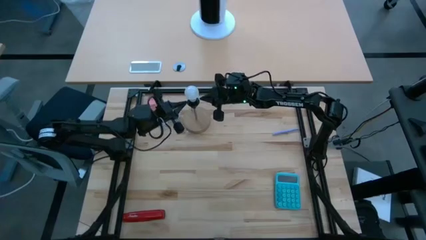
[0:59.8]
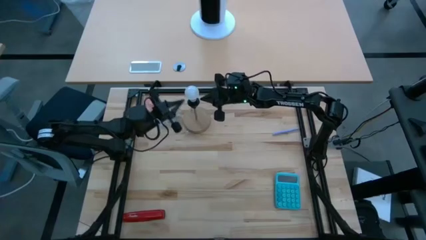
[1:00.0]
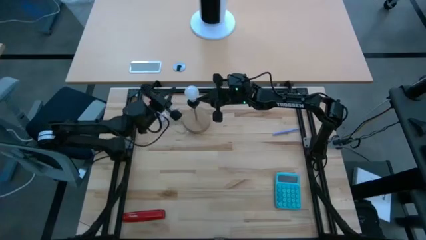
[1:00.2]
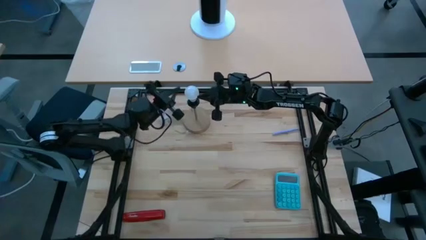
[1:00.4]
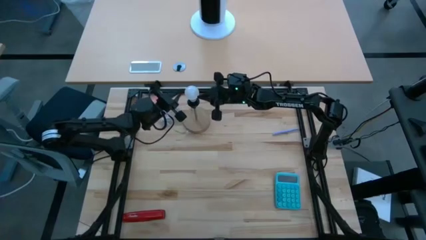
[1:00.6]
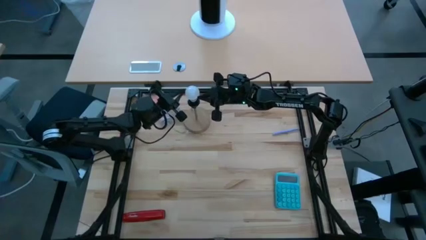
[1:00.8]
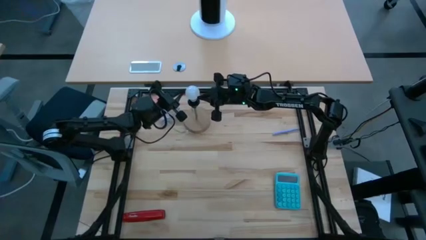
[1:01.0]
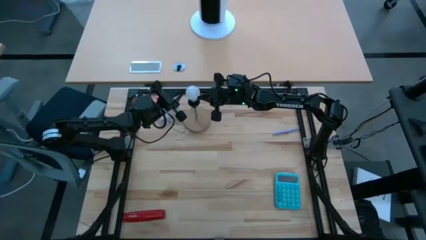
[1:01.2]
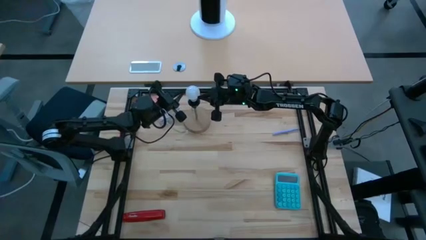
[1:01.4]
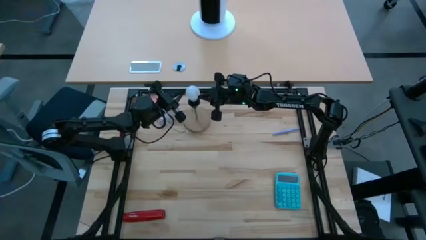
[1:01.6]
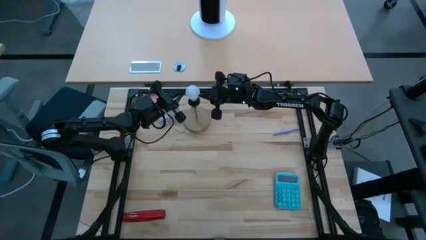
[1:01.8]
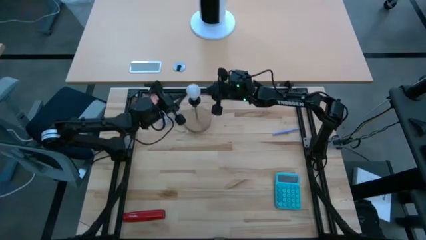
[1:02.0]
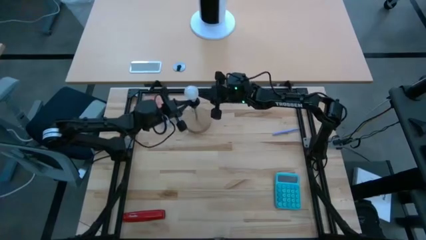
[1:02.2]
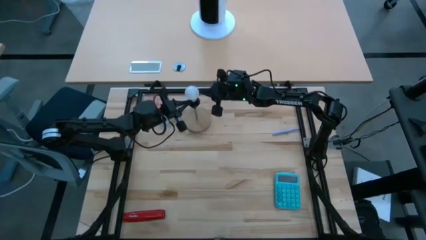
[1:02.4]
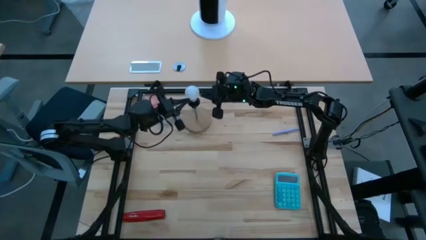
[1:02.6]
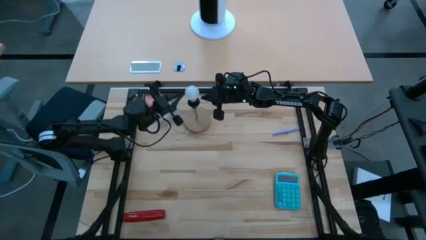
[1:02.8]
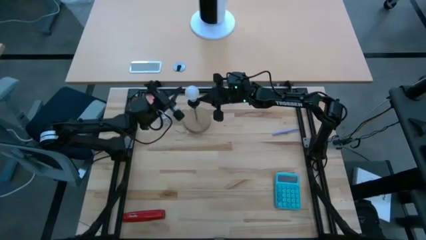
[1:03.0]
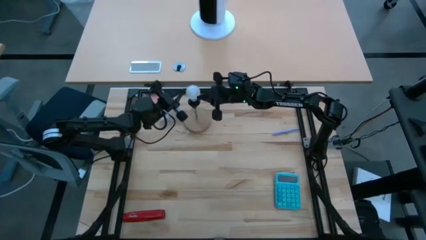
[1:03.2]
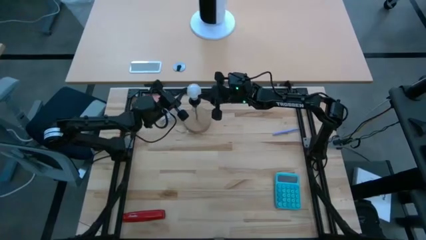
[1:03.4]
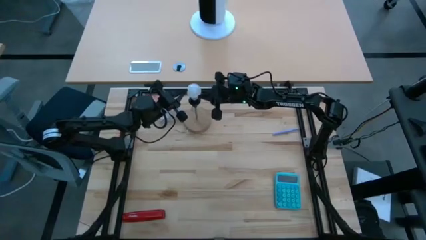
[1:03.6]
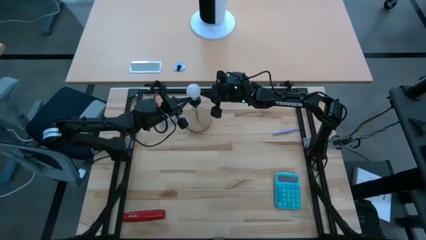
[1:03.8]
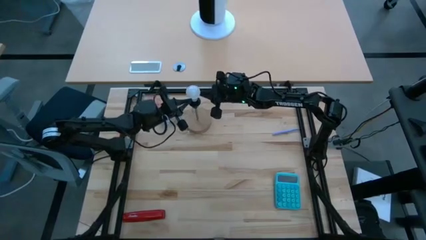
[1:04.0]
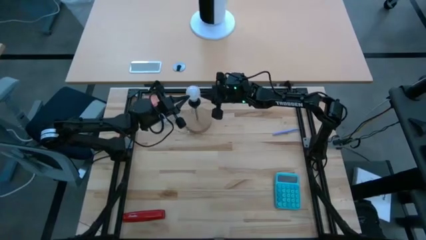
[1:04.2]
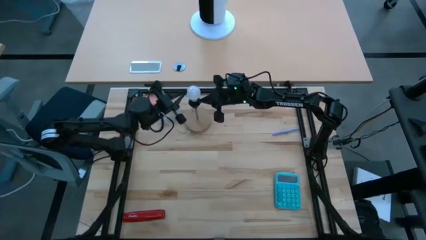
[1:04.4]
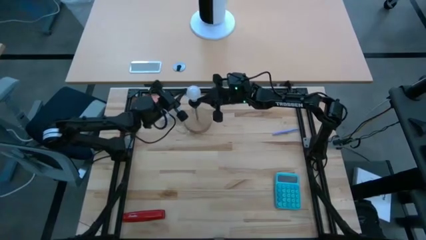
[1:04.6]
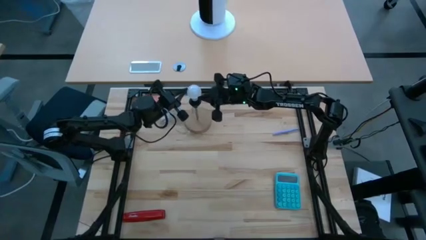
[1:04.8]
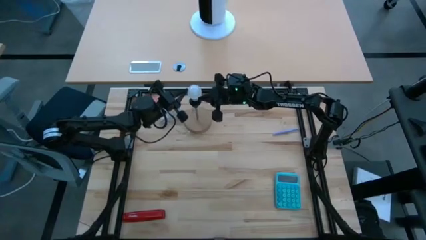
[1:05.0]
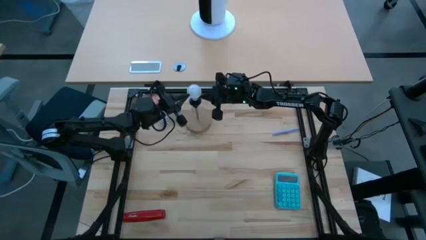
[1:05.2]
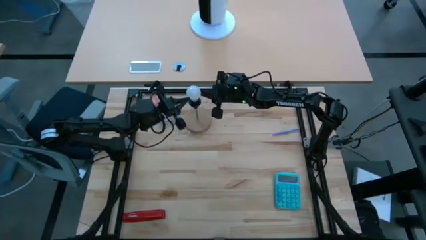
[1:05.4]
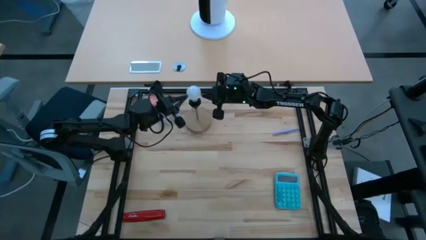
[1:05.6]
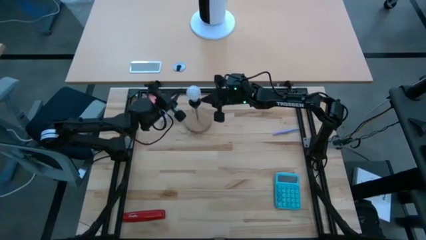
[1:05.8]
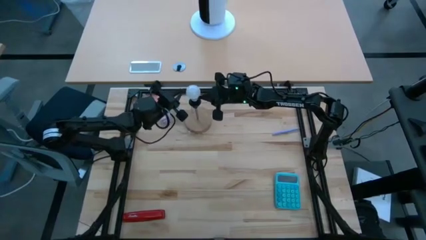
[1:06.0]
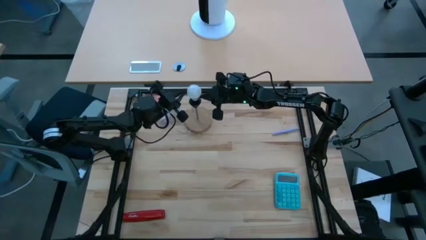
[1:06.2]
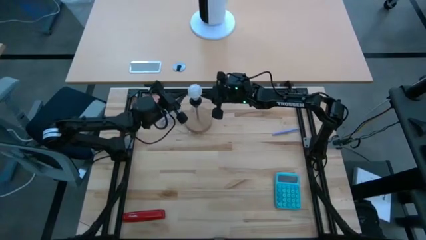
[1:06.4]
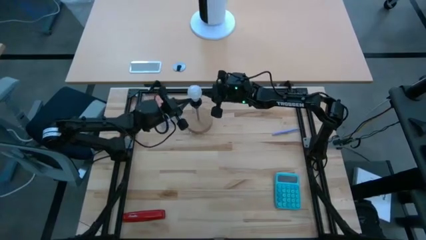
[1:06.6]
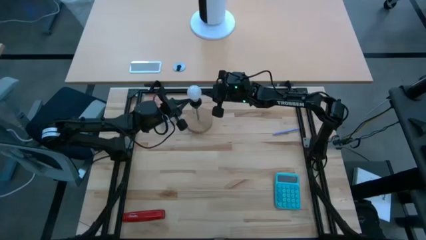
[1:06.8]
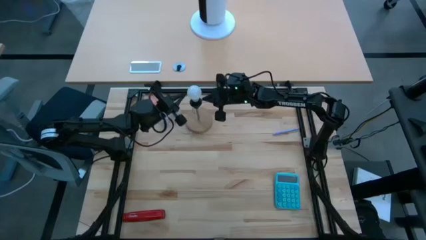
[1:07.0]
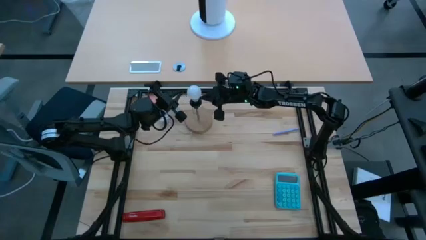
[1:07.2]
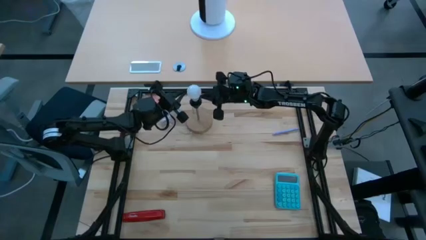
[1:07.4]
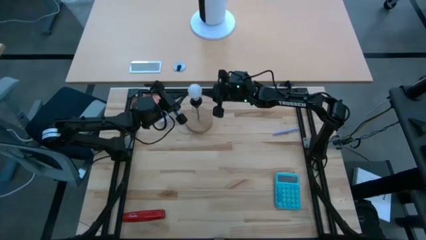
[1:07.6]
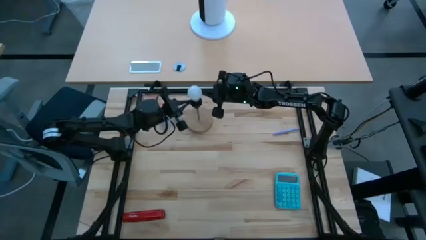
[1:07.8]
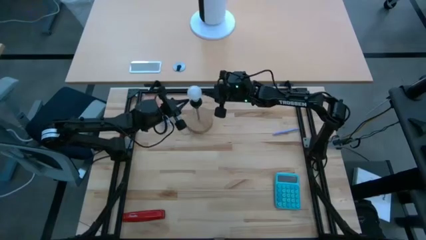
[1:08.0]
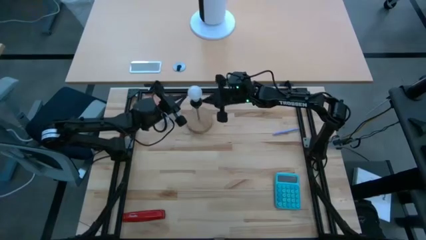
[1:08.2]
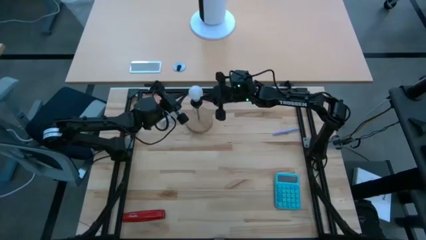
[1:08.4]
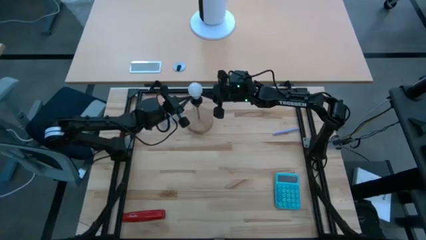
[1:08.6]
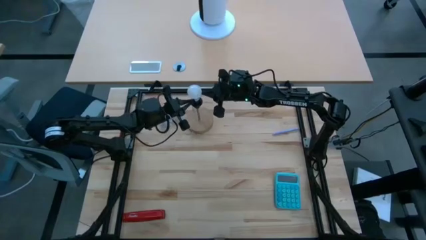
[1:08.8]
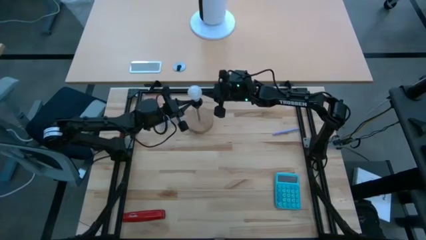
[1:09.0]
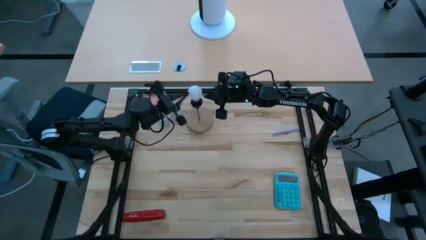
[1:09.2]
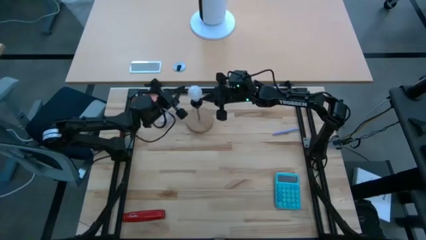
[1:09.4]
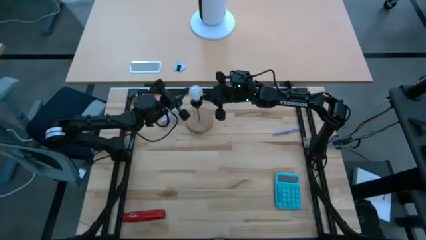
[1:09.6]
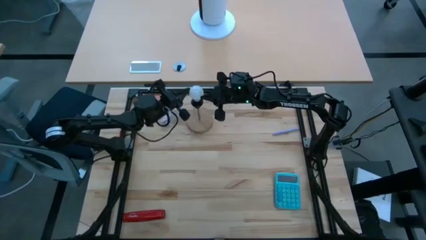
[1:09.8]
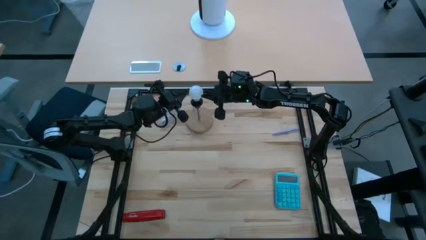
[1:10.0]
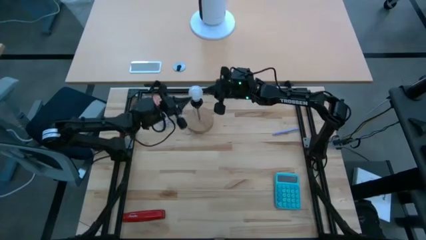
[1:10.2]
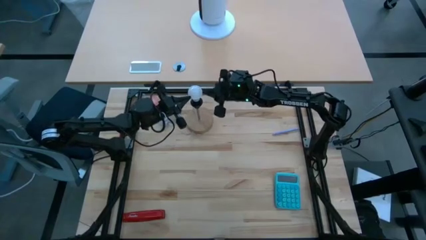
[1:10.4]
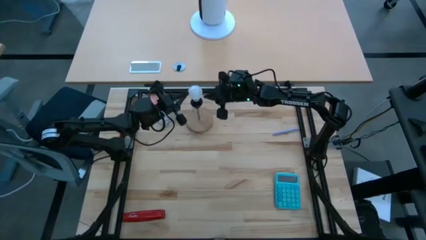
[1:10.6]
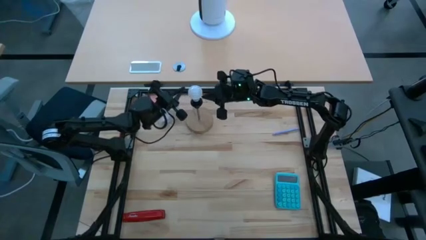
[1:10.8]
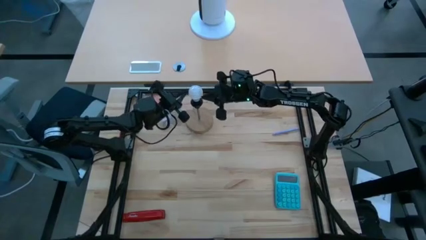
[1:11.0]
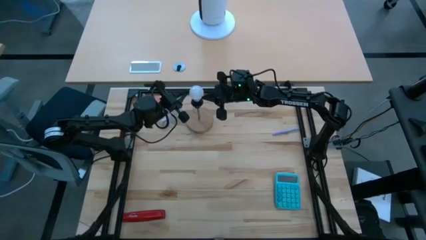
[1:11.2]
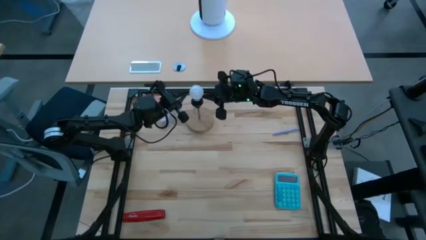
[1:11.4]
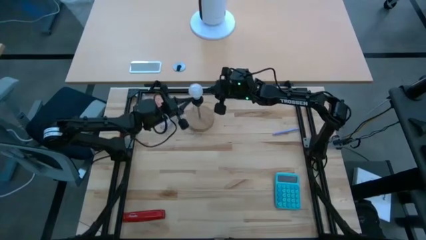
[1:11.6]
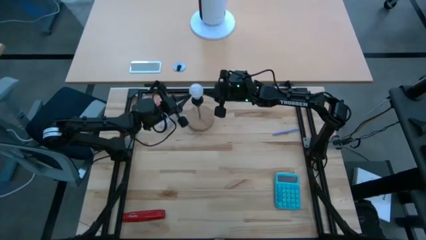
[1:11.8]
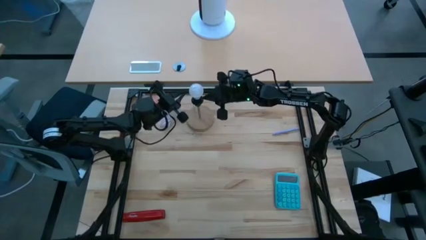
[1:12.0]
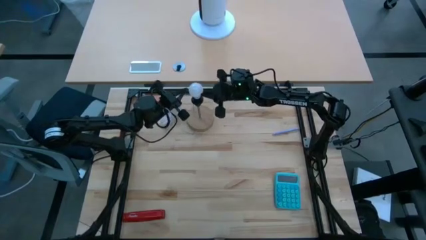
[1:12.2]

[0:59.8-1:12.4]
Task: Screw lightbulb
Remove the lightbulb from the wooden table lamp

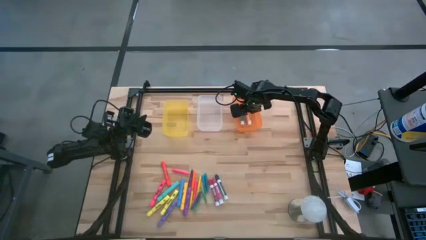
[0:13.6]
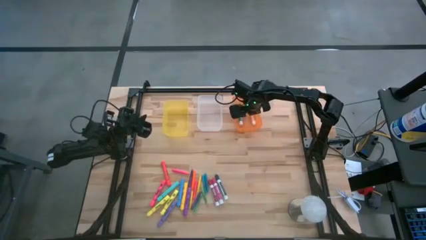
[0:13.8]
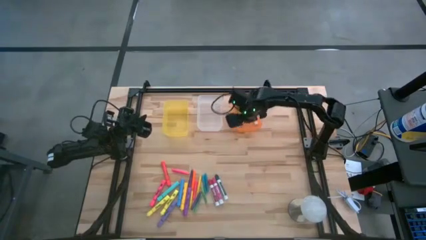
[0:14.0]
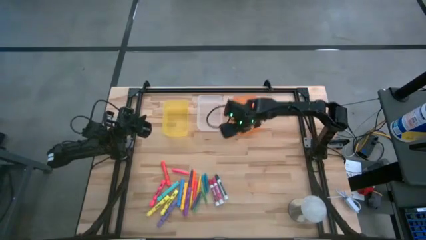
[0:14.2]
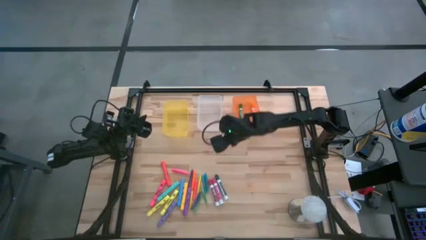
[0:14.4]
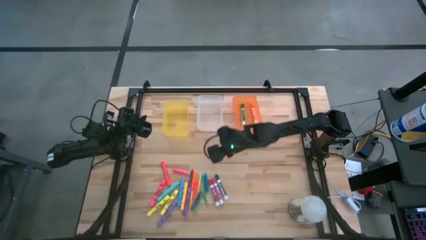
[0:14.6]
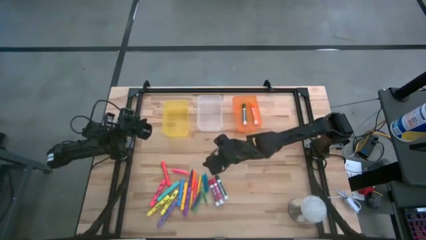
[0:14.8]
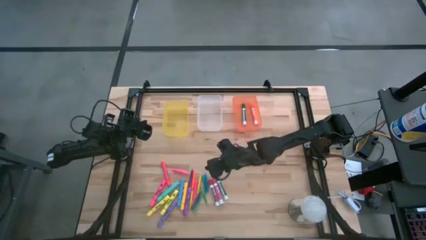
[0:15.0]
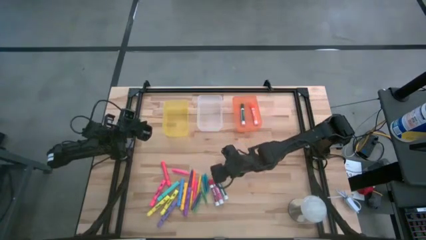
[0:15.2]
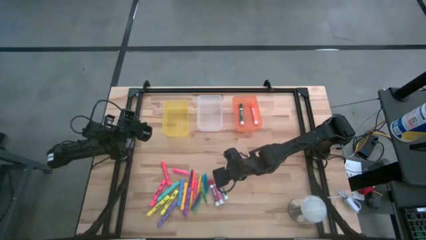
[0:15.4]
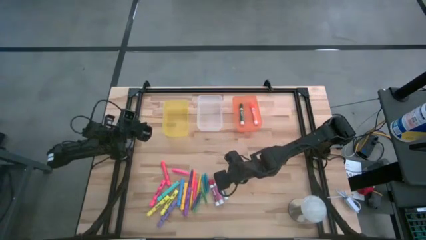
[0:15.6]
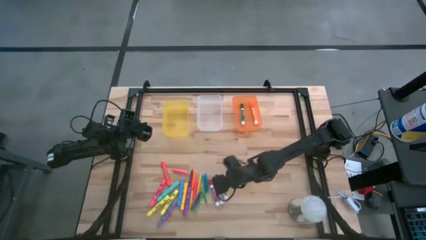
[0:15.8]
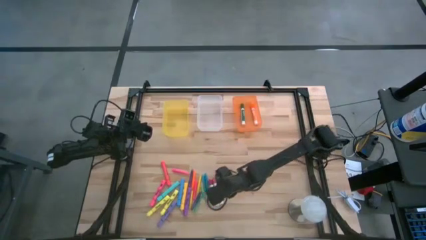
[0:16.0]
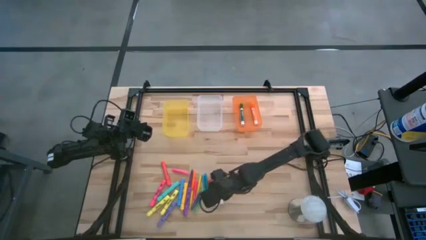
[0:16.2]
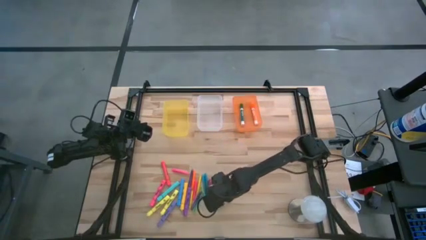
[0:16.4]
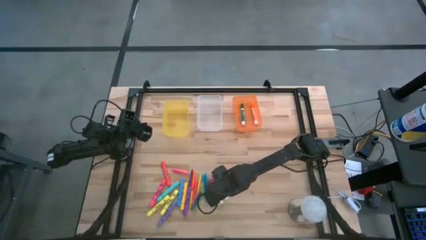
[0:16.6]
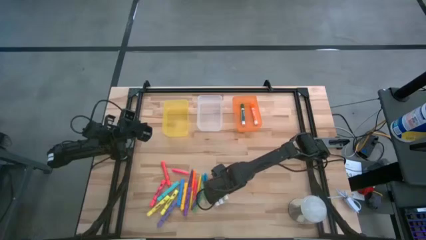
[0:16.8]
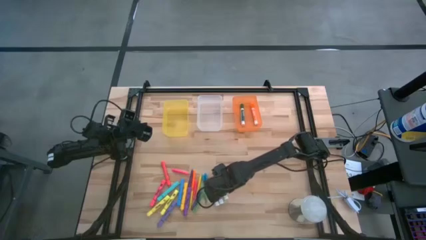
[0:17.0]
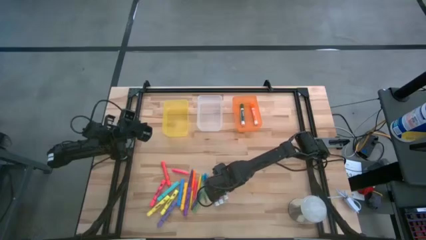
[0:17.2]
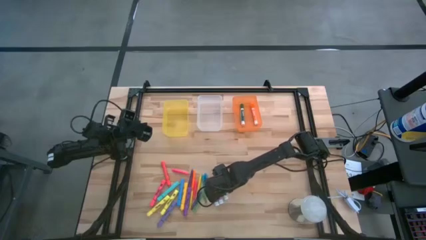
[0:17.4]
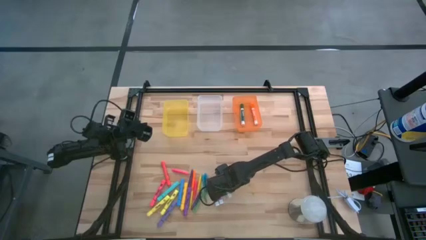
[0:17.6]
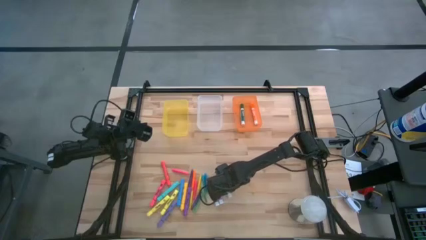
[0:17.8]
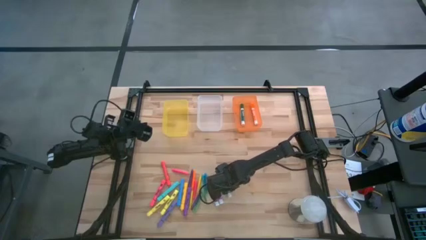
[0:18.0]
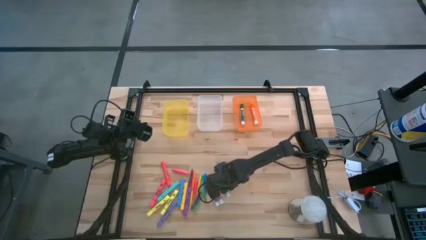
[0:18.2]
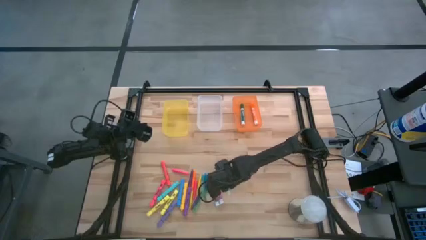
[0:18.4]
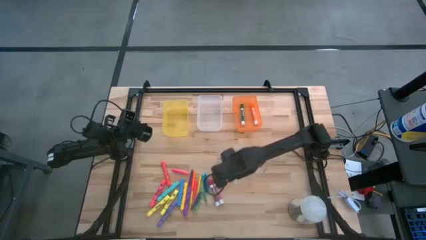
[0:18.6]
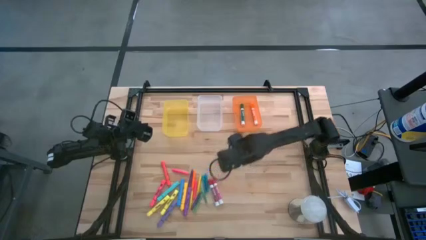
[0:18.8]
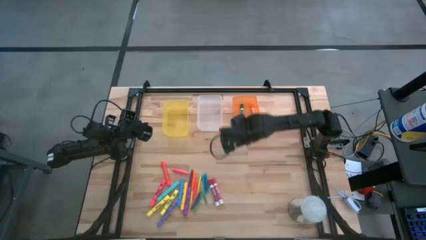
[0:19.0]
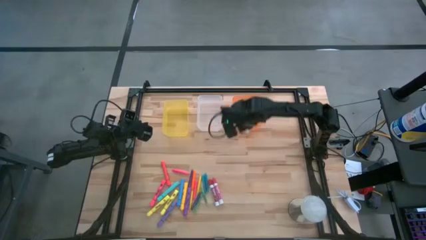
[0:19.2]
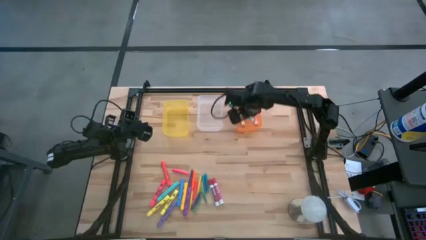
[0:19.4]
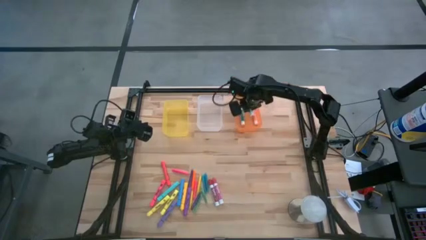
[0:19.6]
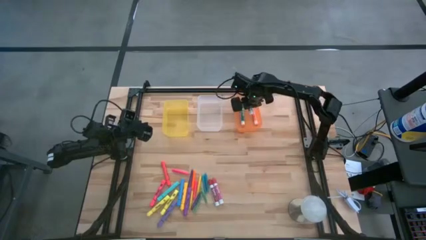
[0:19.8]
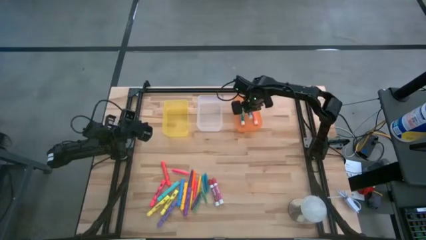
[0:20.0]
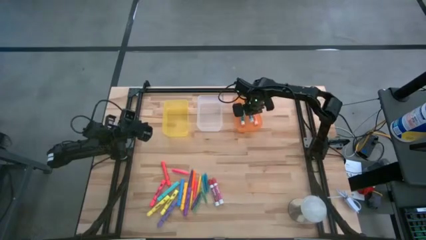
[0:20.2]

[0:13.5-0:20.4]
Task: Pick & Place Markers
Put the dark green marker pen into the orange bin
